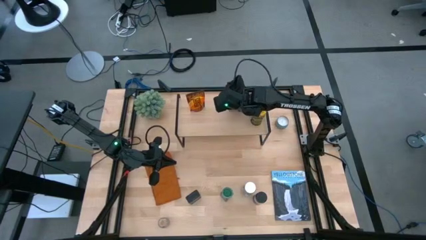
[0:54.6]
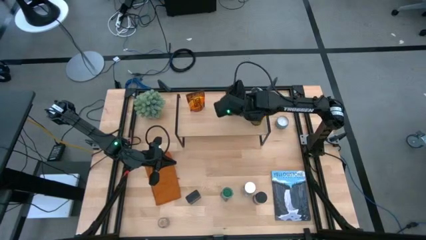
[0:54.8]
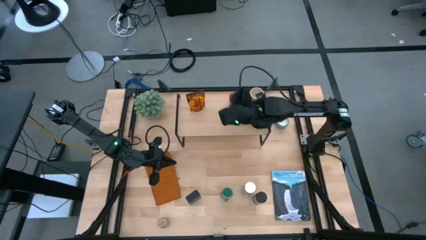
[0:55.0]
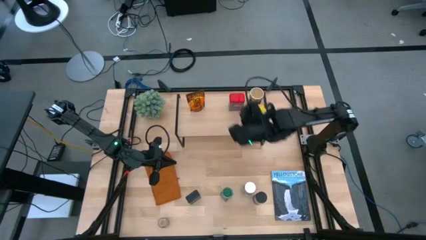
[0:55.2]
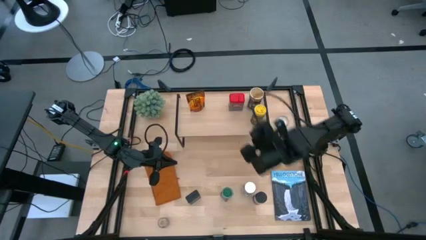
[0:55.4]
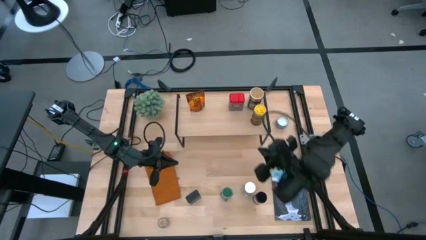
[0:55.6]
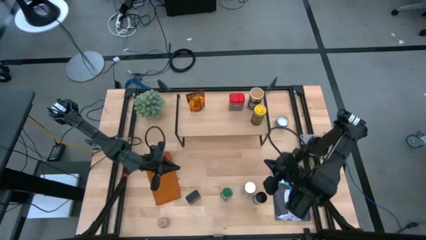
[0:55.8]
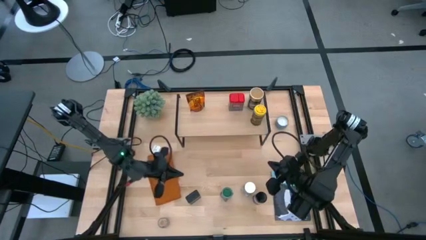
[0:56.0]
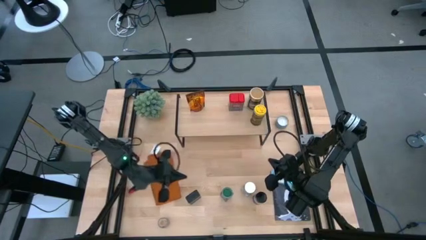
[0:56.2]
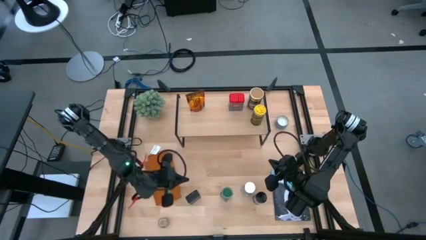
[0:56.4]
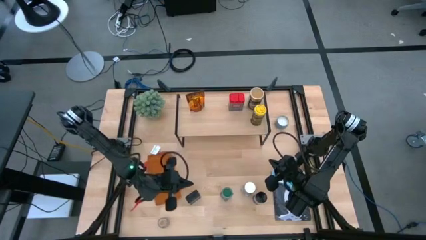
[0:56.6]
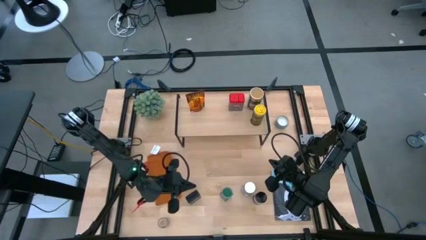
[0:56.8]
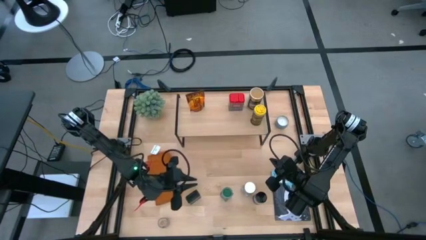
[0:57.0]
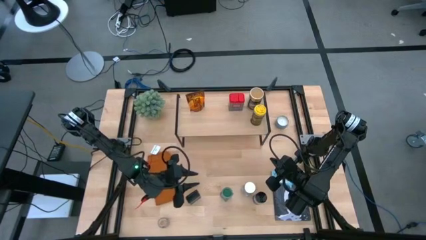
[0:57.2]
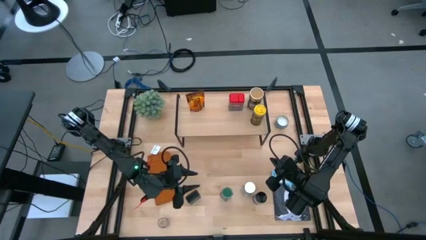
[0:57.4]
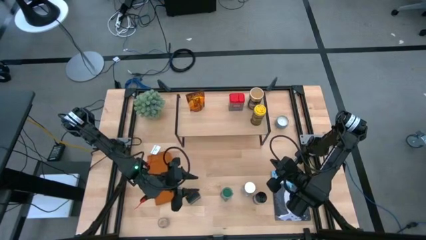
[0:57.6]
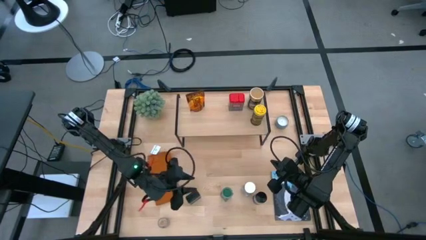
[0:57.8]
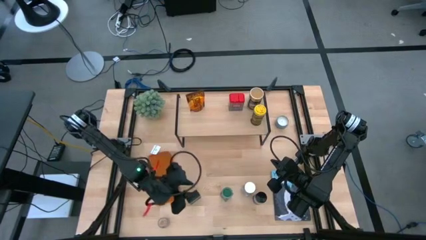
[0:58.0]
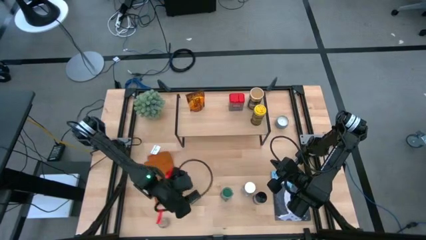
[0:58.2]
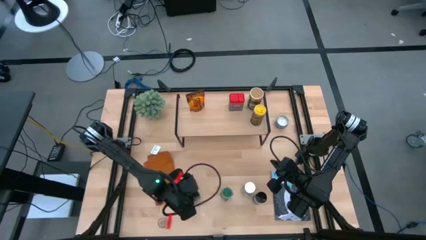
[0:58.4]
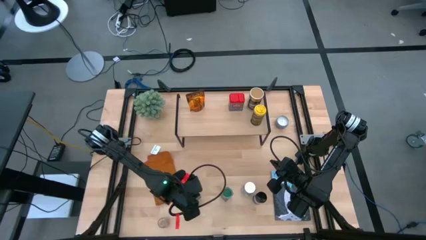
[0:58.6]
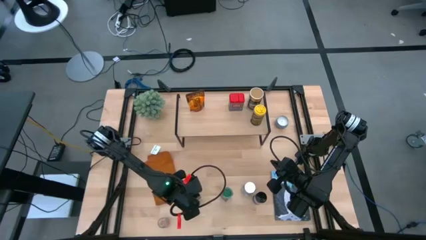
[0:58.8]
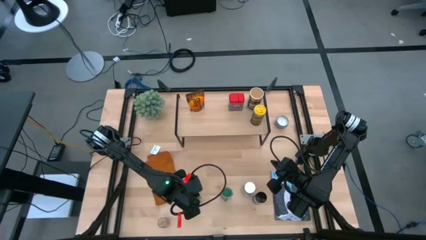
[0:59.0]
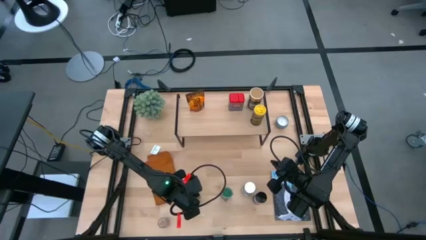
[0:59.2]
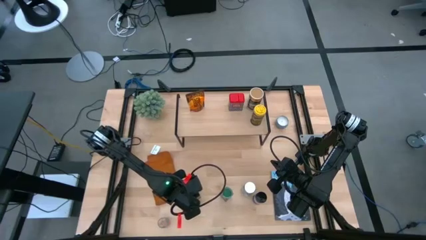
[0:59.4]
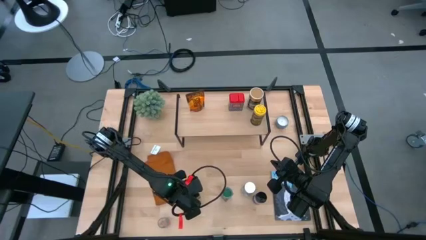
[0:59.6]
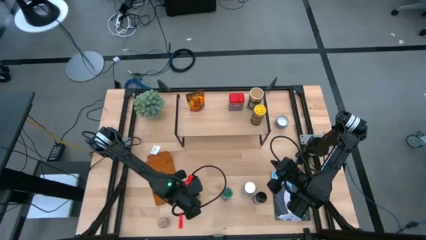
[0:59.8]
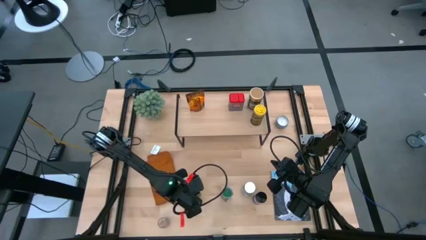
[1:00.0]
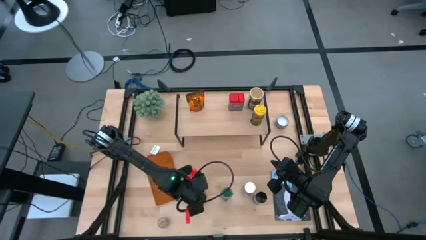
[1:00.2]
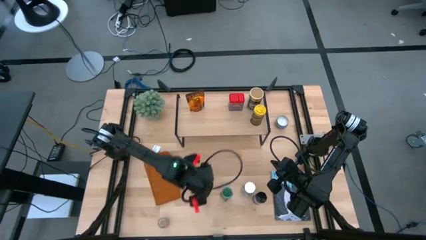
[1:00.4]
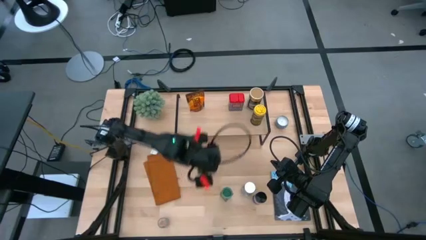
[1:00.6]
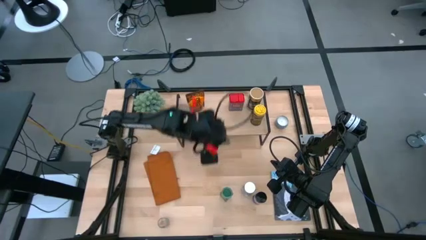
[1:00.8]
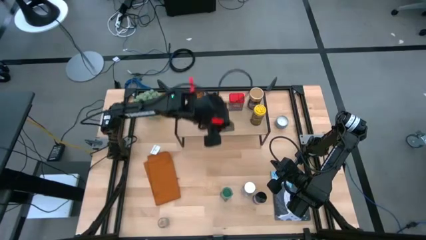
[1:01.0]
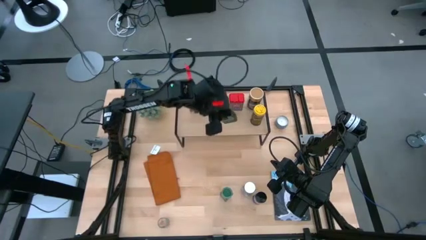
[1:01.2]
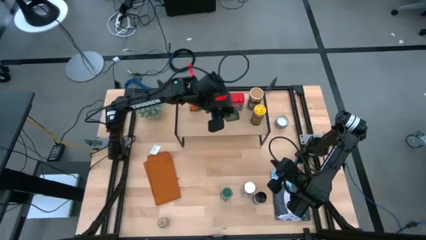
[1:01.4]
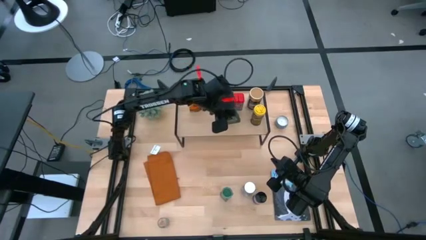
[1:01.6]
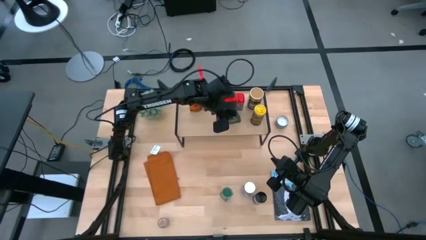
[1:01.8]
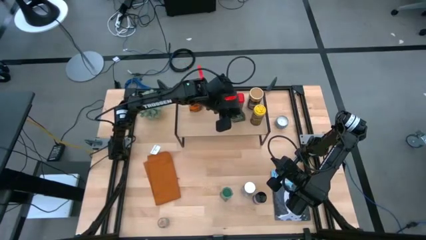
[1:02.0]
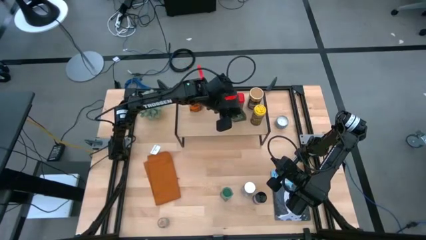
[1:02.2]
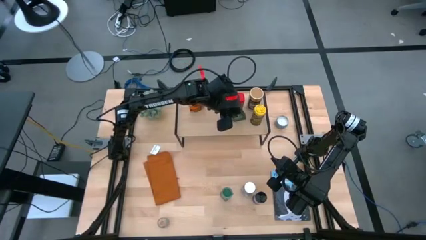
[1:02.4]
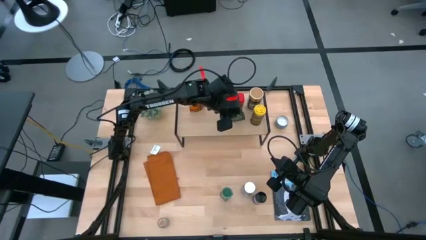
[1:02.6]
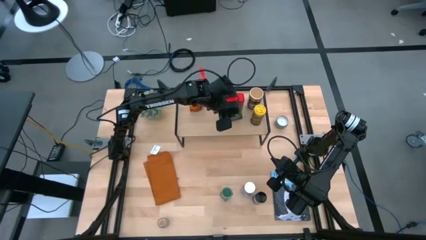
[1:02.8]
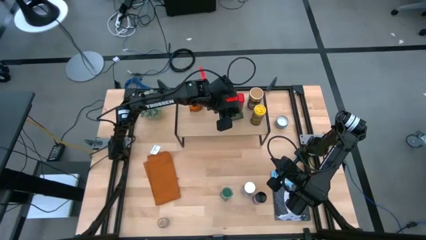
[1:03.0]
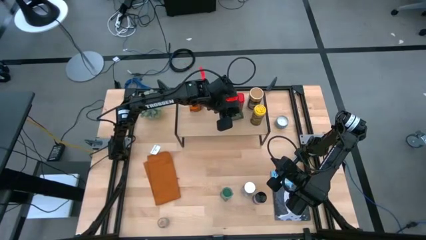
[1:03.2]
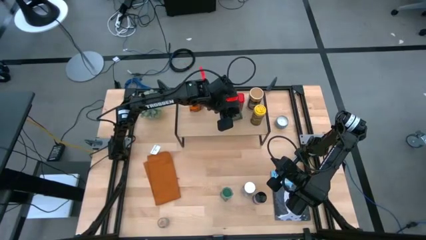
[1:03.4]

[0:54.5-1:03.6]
Task: Shelf spices
Put the black seasoning can on the shelf

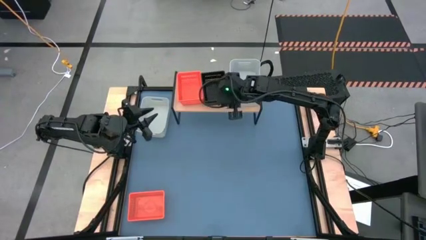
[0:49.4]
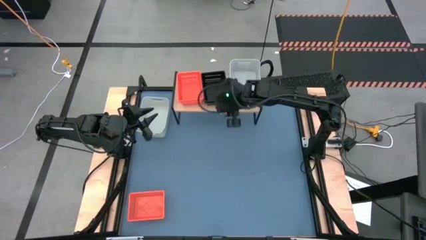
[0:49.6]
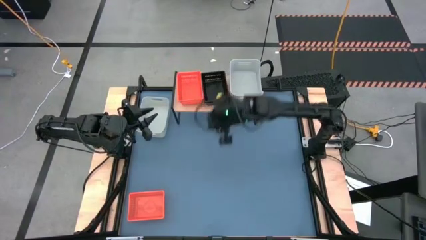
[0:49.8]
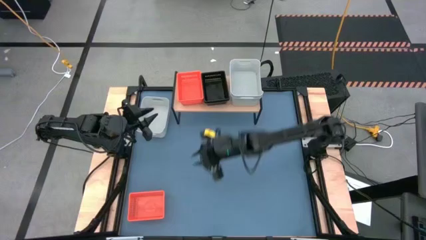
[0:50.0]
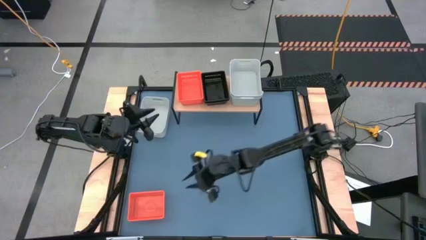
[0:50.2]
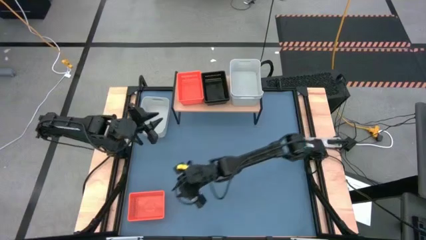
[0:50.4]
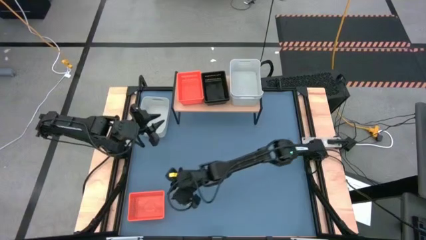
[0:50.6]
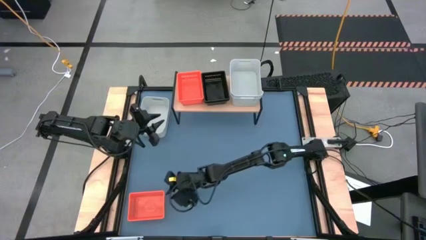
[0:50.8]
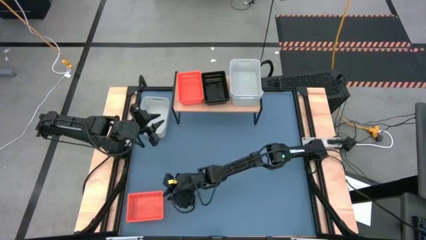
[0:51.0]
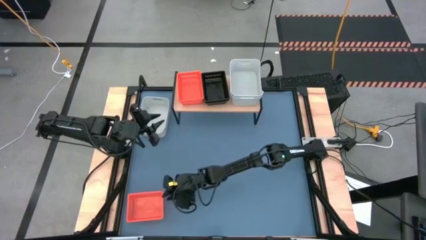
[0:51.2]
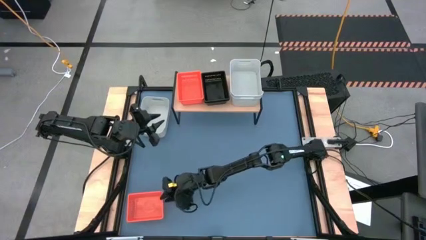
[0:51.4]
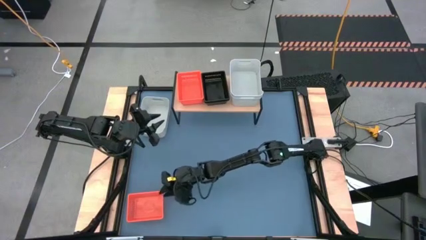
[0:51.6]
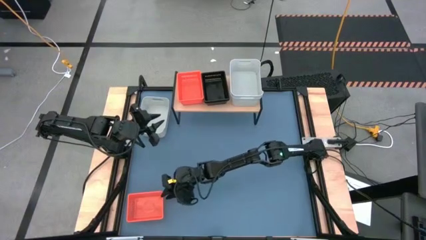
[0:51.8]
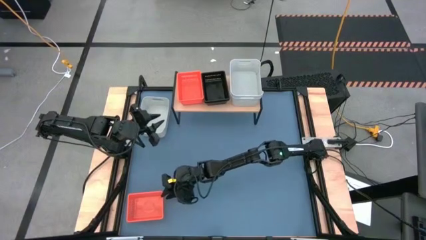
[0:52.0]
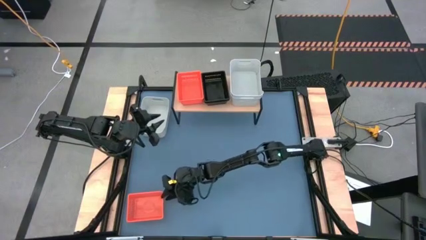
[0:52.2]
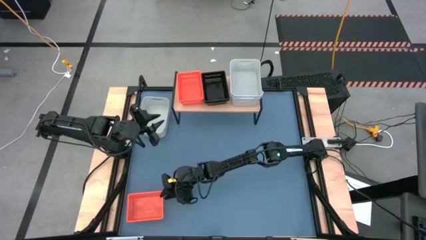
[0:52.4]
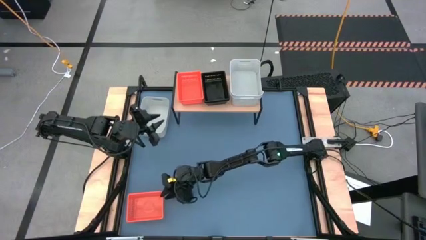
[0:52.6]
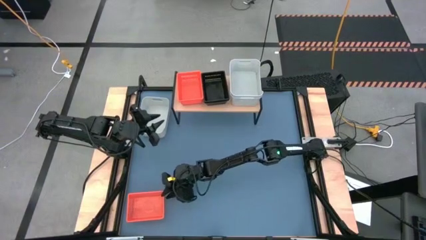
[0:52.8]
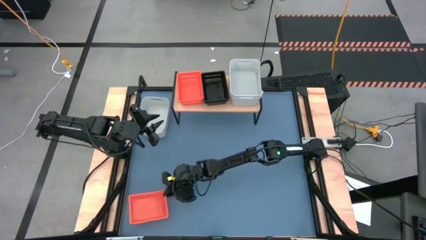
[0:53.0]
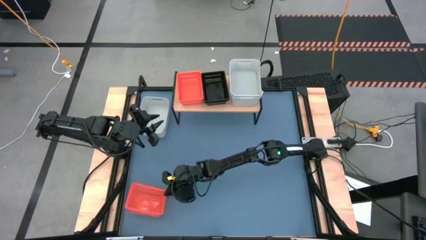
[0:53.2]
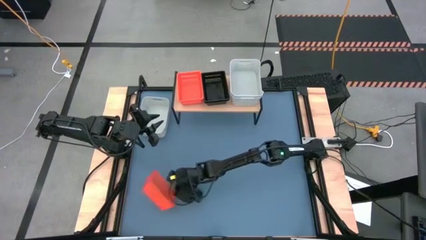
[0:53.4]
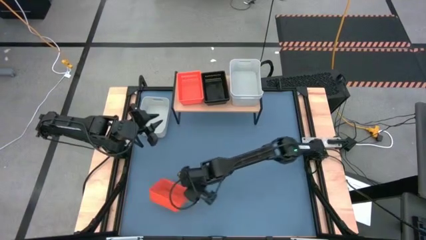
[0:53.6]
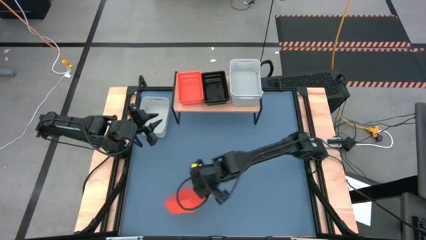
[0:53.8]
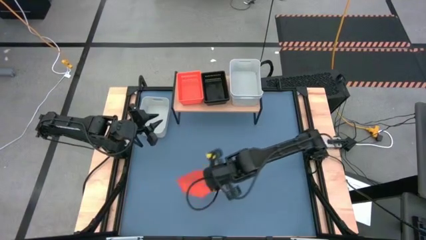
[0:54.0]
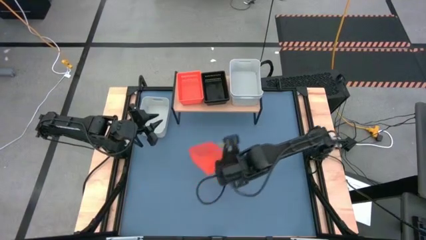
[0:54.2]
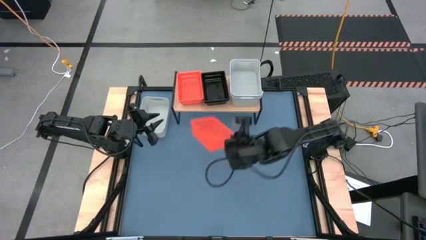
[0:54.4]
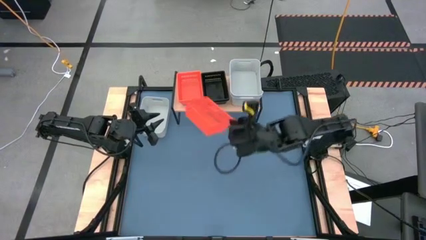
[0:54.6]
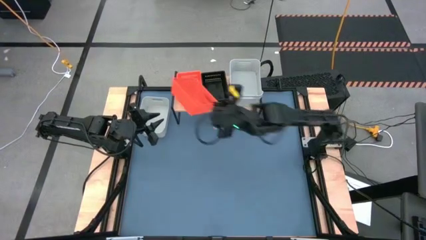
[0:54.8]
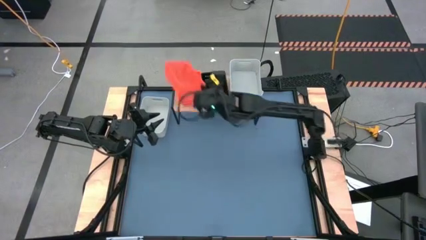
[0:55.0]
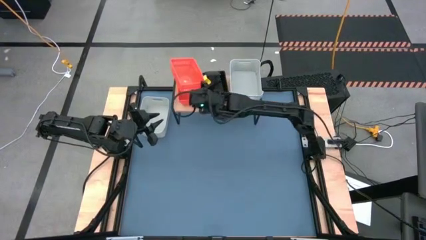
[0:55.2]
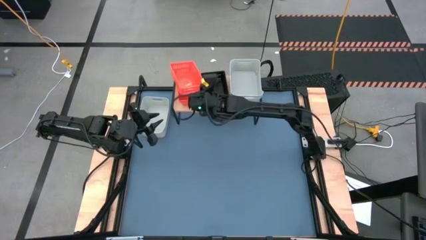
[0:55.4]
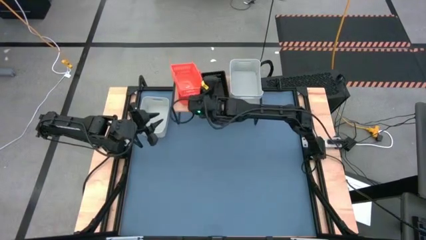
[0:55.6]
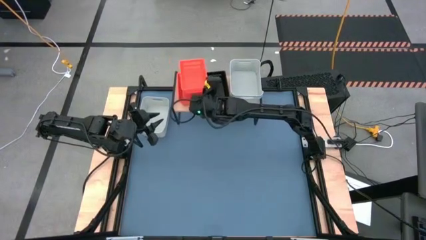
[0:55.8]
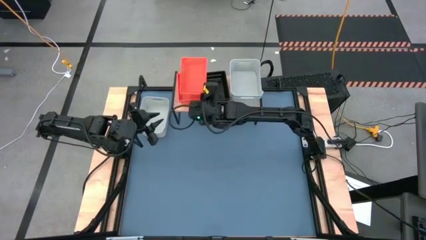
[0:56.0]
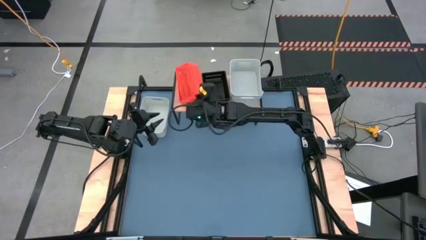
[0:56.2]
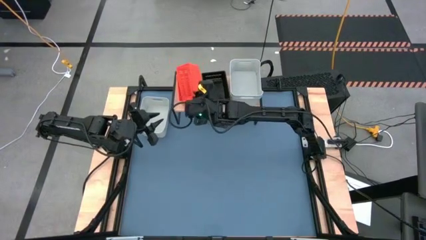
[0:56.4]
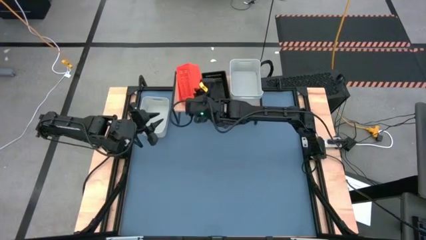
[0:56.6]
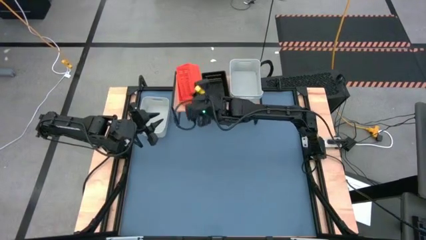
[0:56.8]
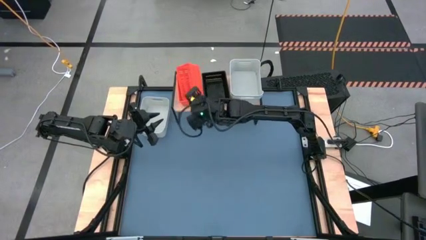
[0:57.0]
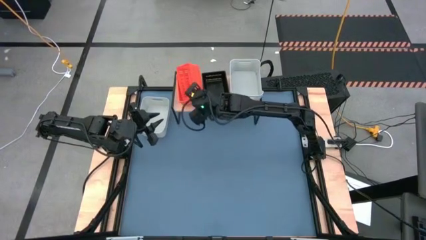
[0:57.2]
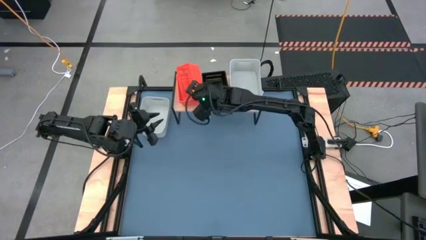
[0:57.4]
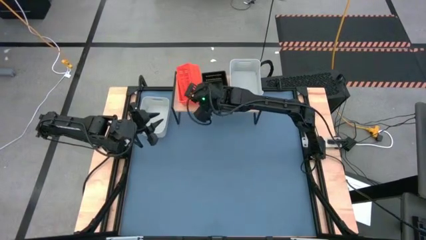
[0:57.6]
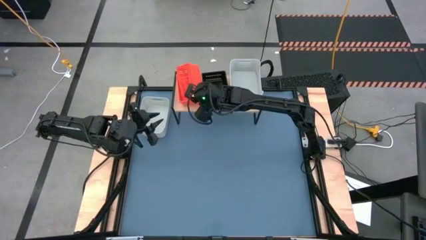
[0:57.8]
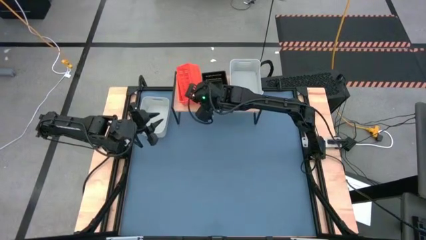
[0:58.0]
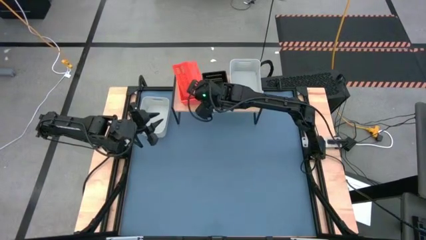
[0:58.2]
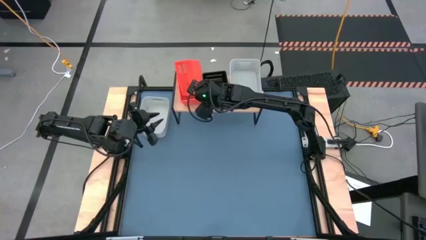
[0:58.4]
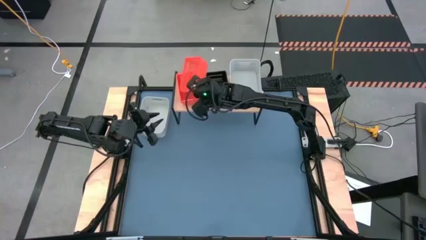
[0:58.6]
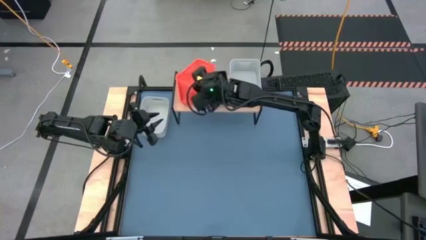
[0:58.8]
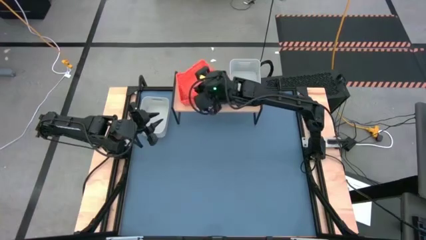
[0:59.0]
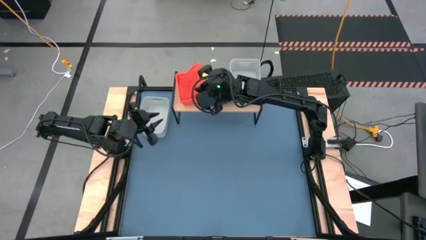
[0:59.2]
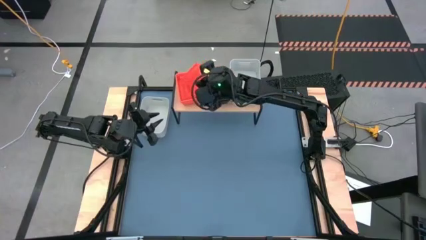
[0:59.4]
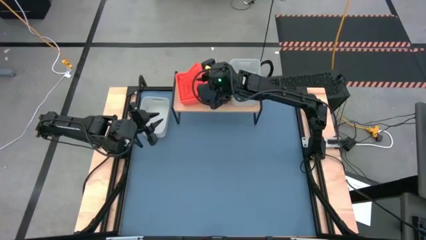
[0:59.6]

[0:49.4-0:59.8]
Task: Stack baskets on shelf by color
Stack the orange bin on top of the other orange bin on the shelf
